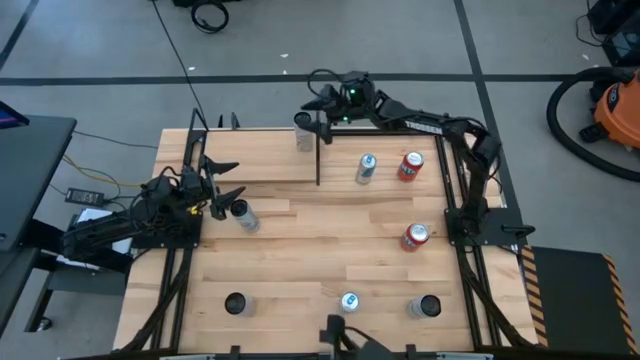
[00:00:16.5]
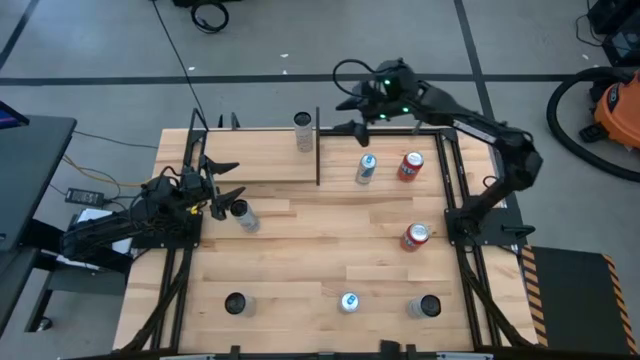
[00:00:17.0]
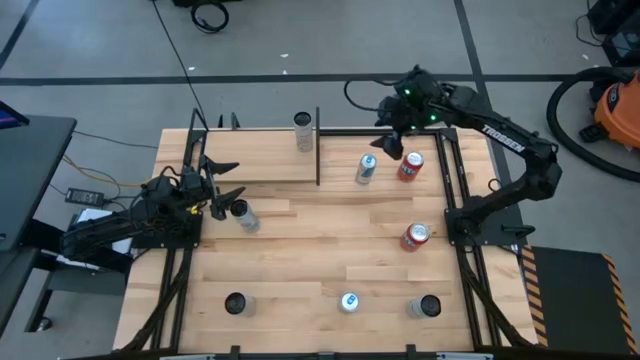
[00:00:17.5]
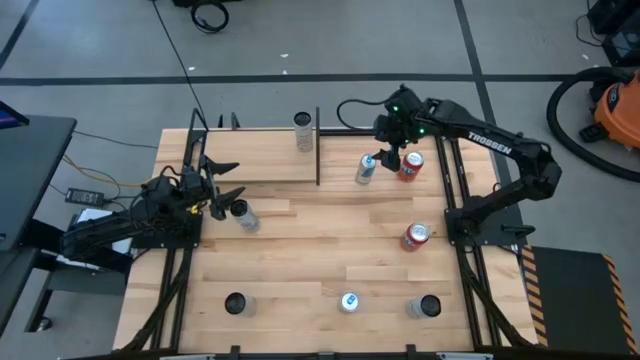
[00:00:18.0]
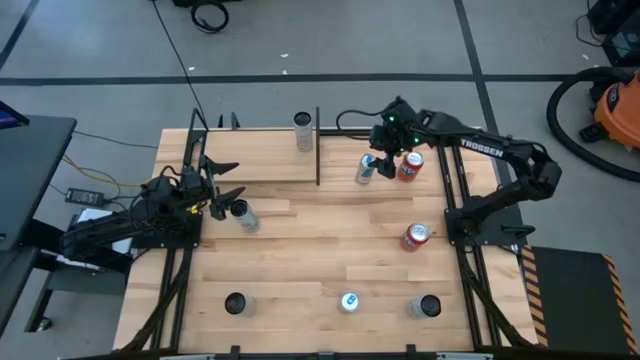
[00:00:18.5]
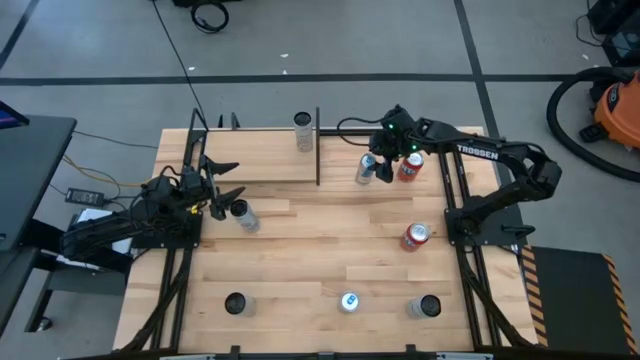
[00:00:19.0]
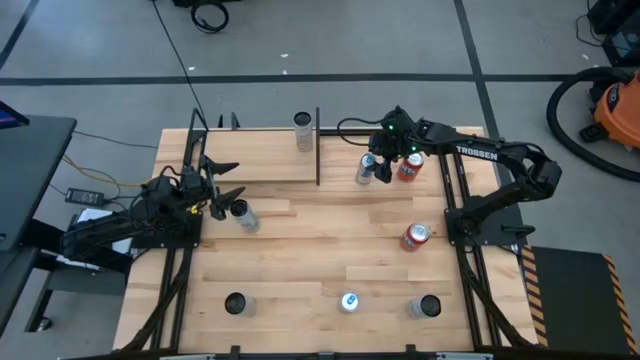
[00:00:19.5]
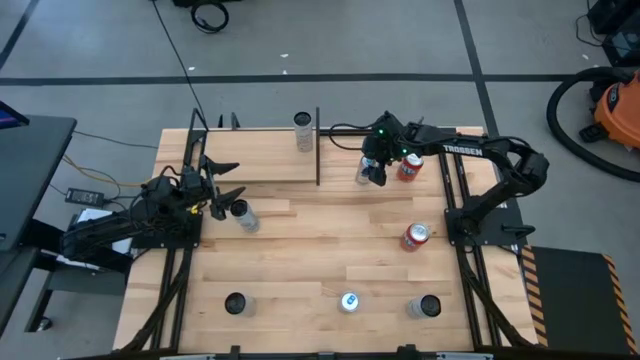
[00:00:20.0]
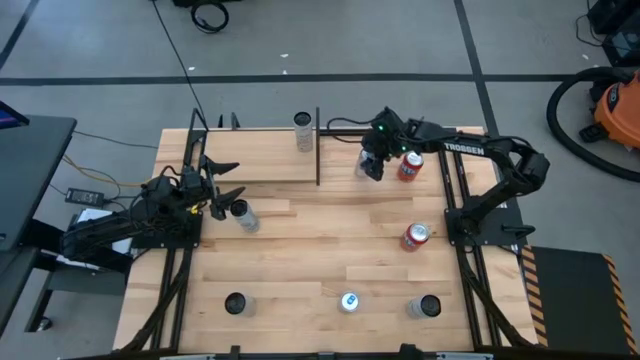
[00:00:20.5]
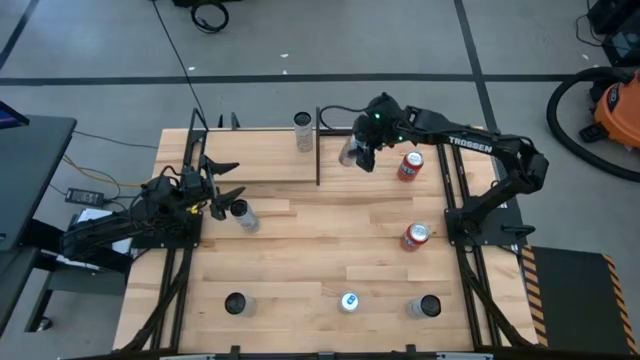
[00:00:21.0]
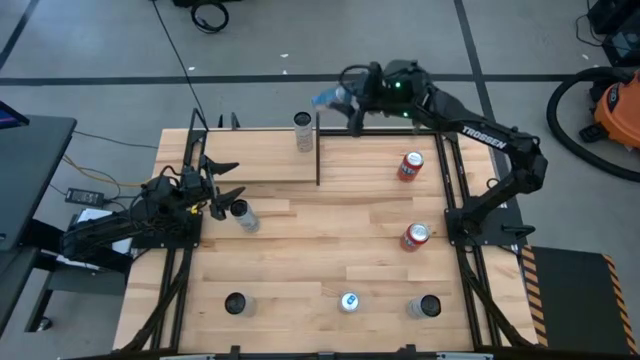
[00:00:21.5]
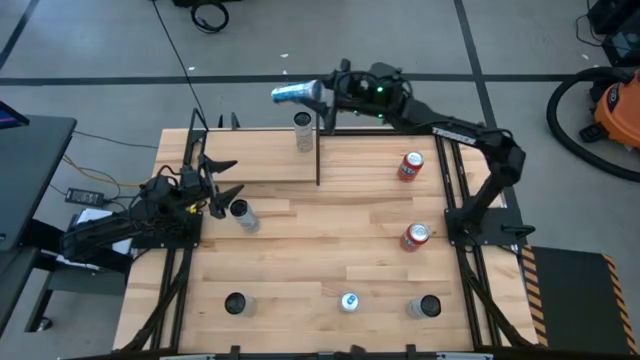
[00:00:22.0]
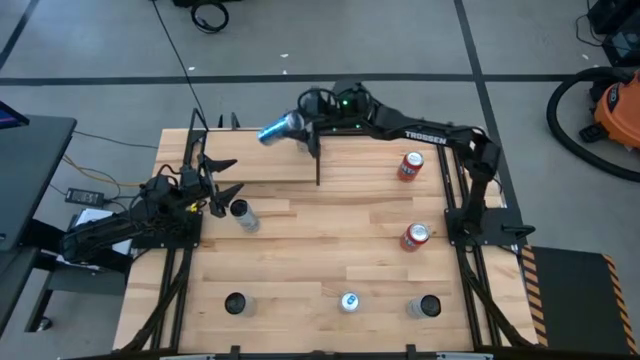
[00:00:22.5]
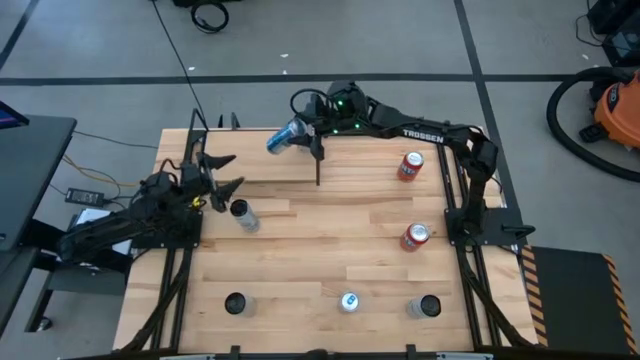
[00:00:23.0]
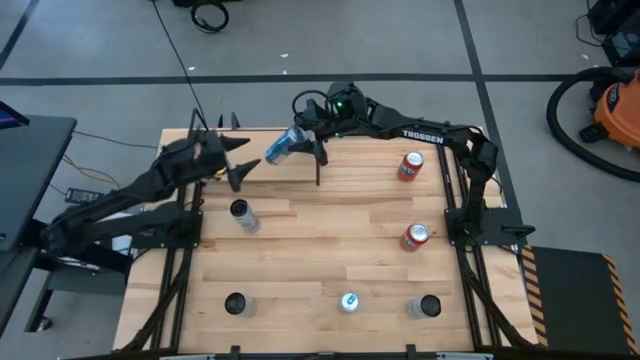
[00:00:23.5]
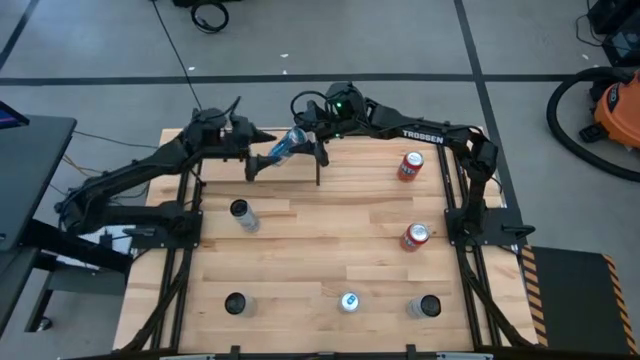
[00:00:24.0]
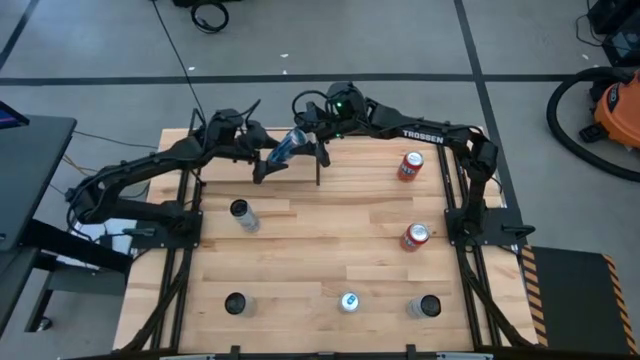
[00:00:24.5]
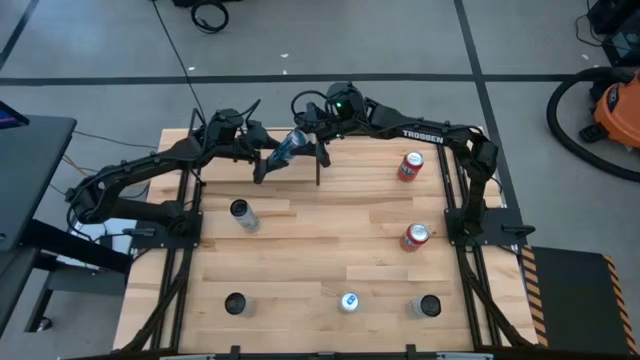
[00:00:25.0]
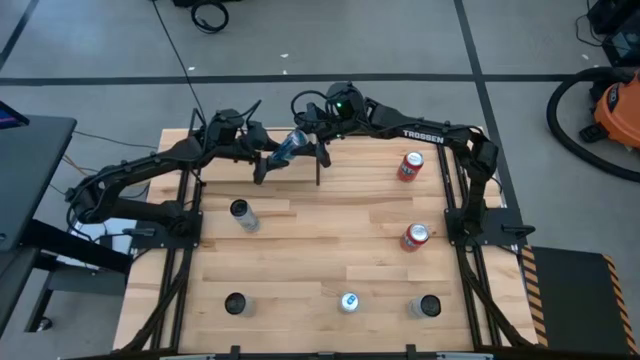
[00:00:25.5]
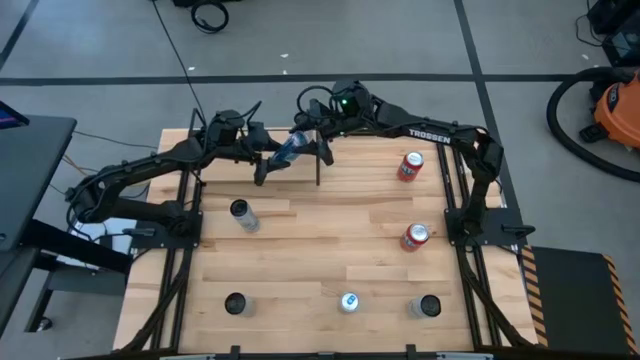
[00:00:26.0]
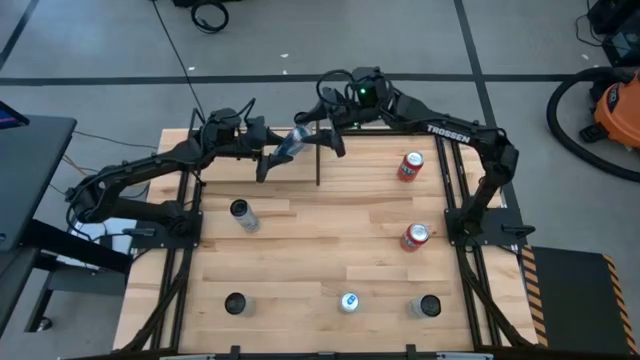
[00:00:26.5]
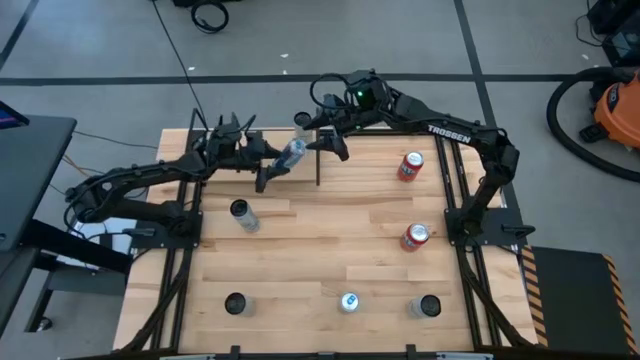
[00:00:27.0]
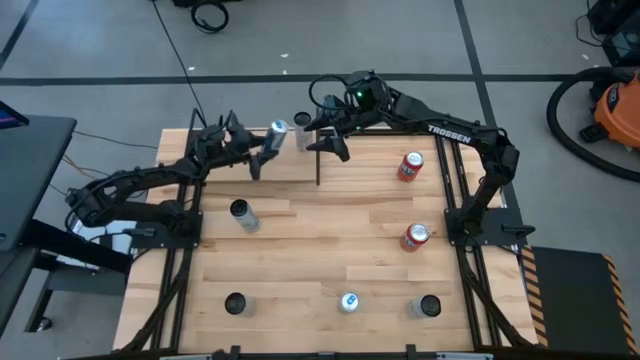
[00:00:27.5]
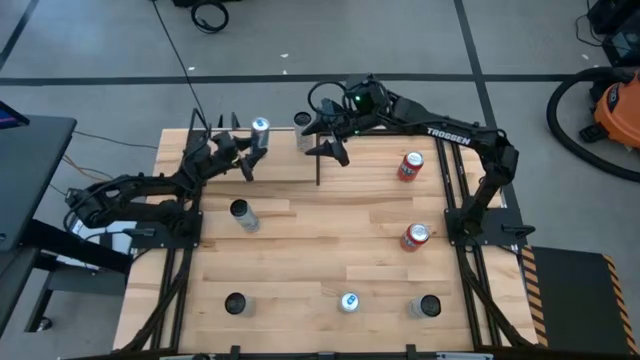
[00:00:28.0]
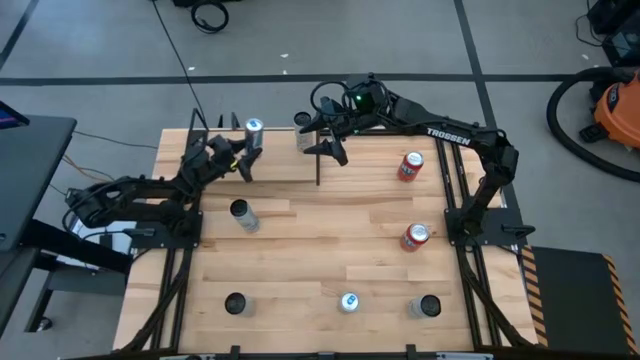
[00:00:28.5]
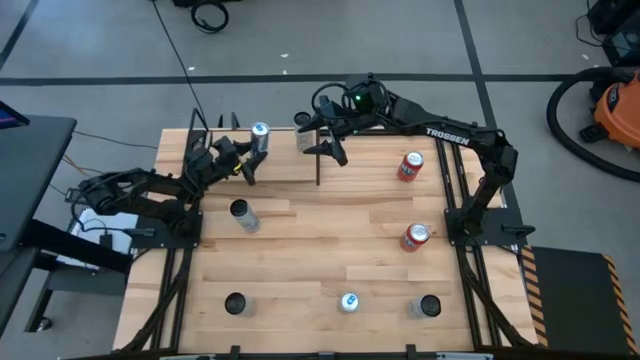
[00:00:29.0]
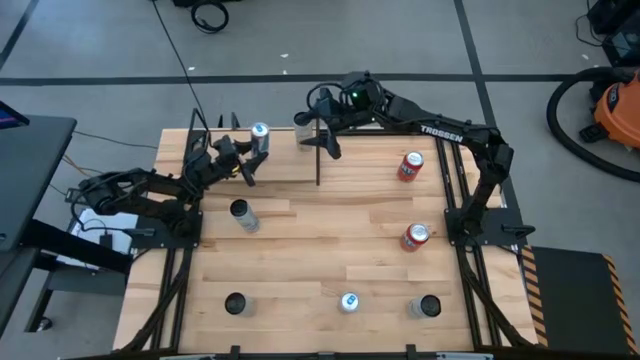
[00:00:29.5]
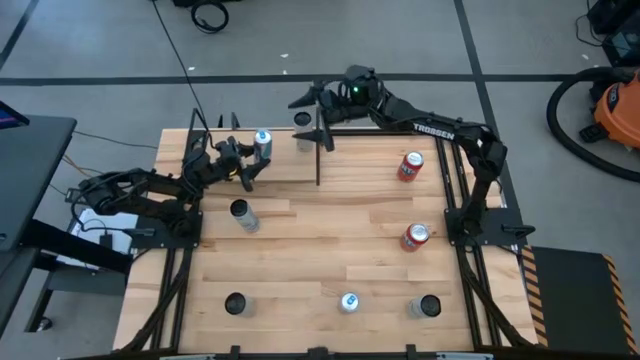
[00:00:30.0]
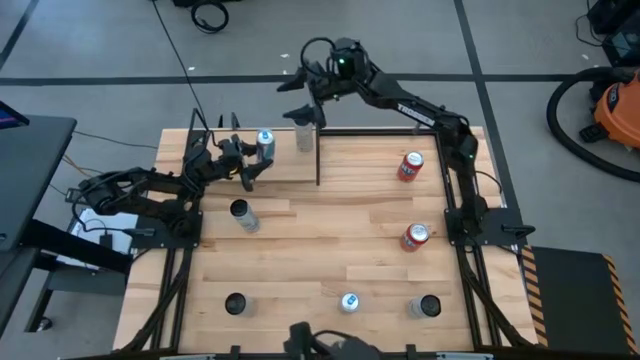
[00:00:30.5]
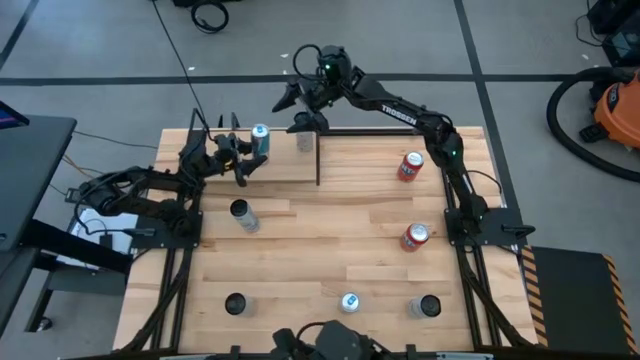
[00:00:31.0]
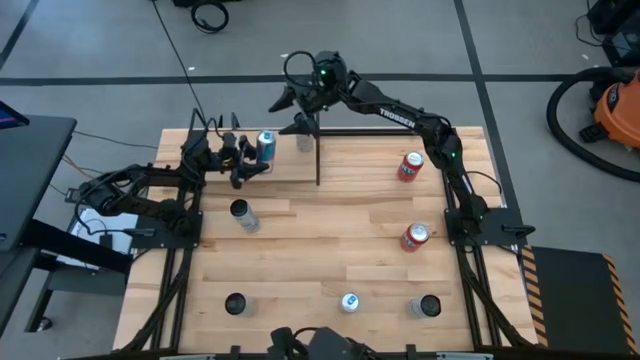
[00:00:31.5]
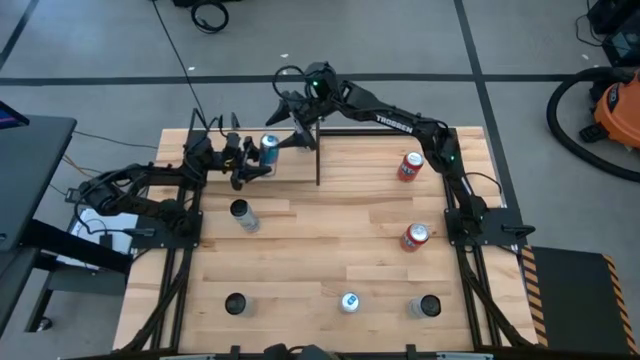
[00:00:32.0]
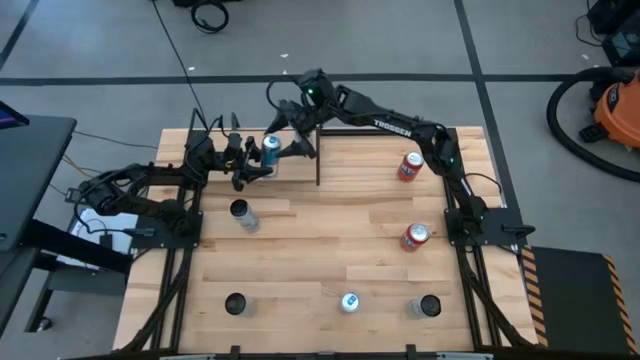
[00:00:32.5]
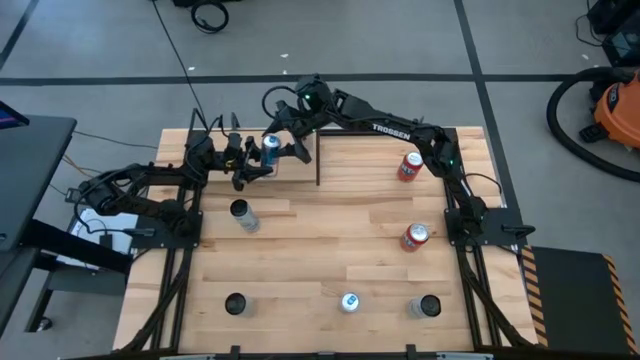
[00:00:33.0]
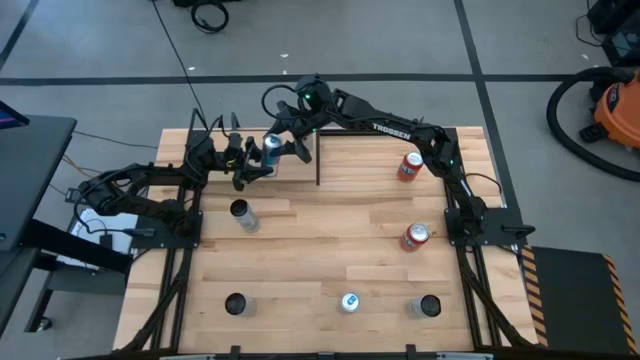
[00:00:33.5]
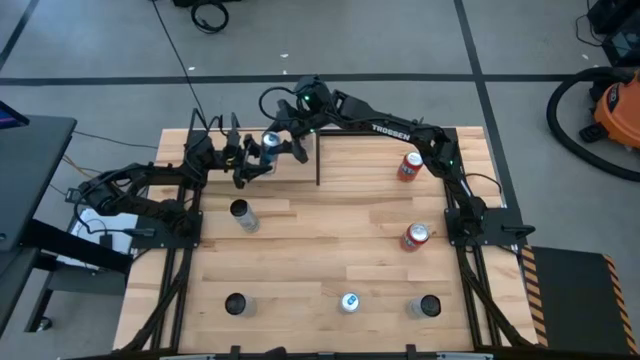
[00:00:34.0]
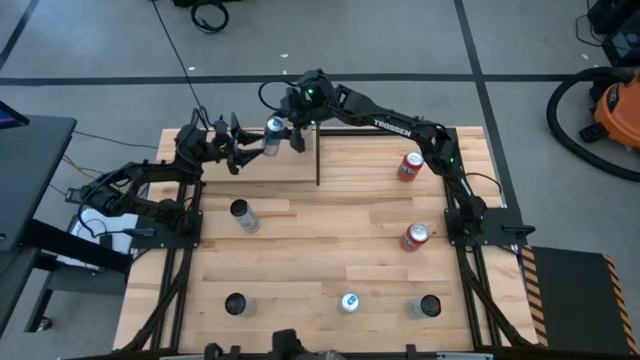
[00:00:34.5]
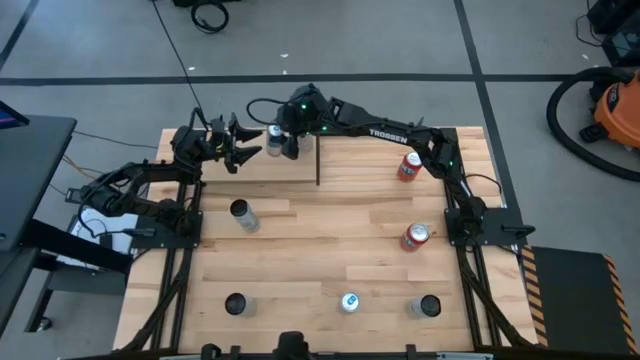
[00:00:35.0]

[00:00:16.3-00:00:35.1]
Task: Place canned beverage on shelf
Put the top blue soda can on the shelf
